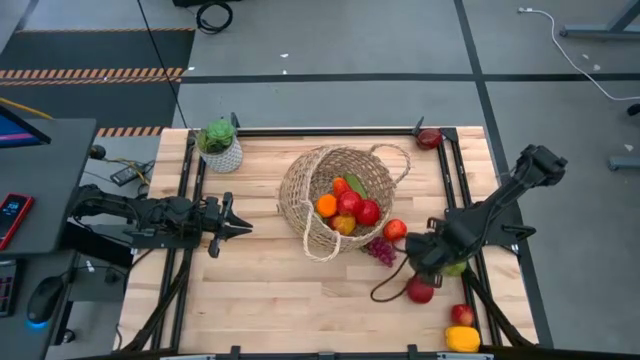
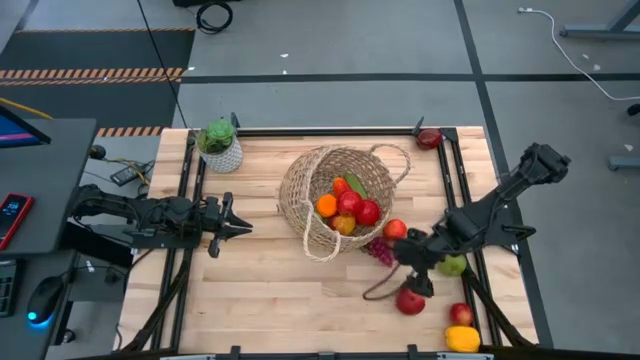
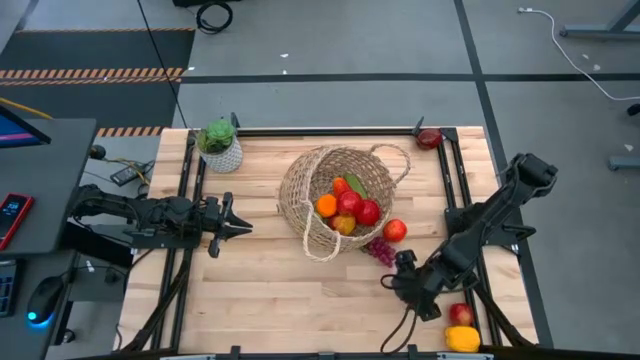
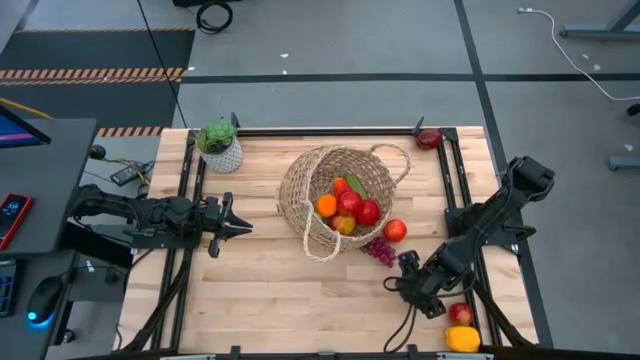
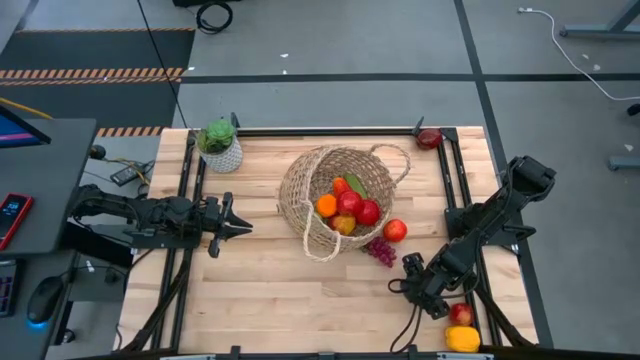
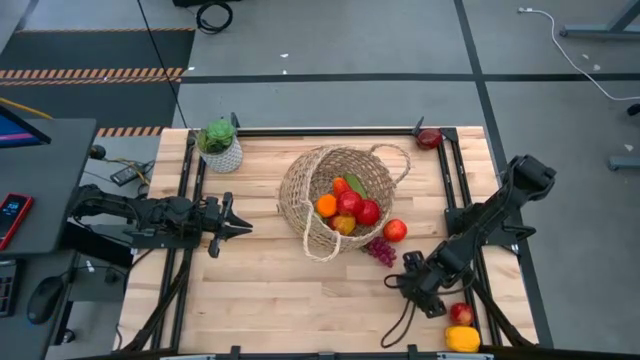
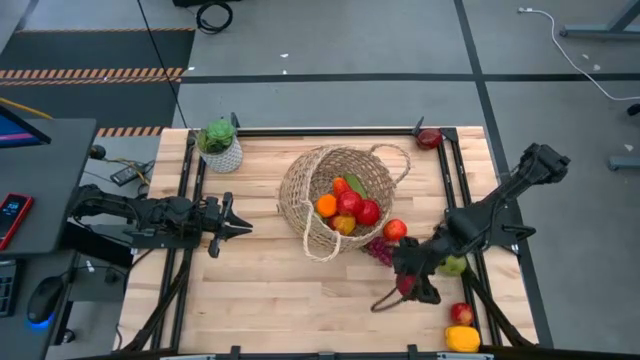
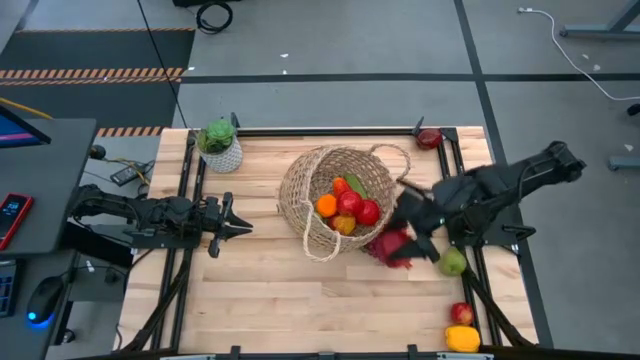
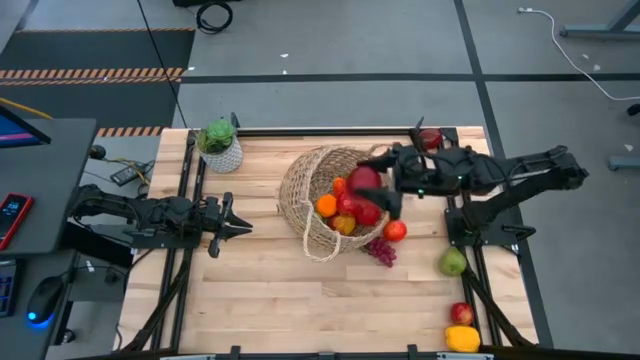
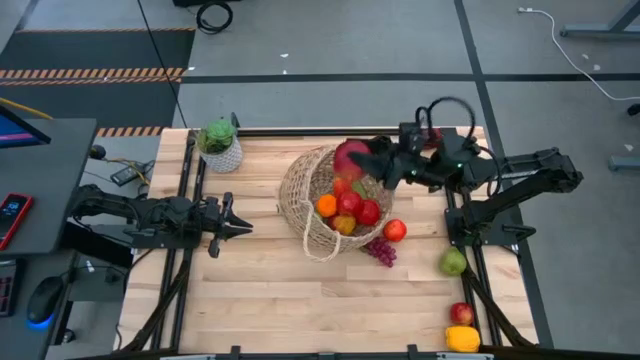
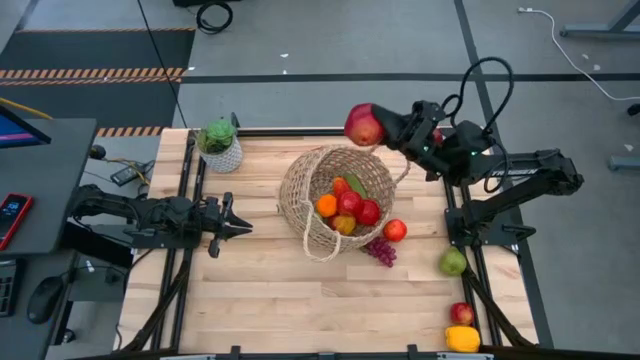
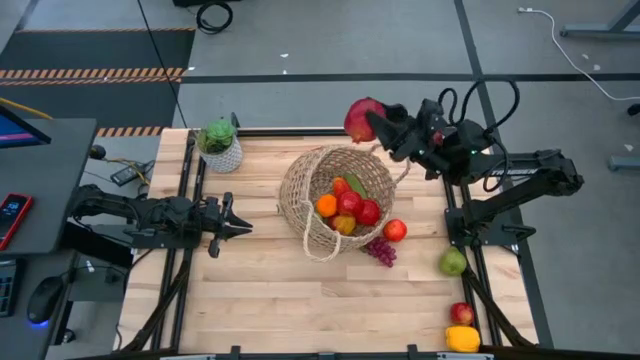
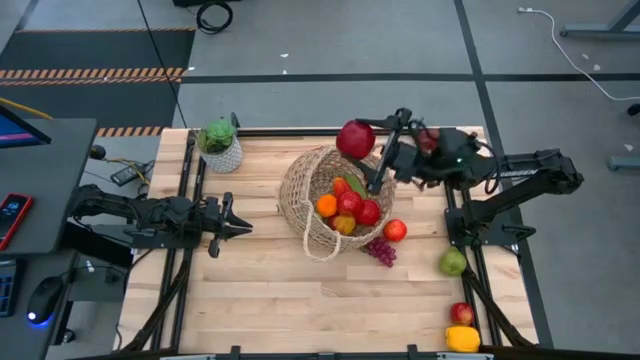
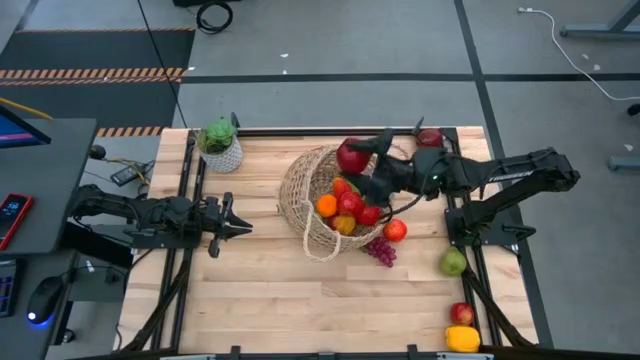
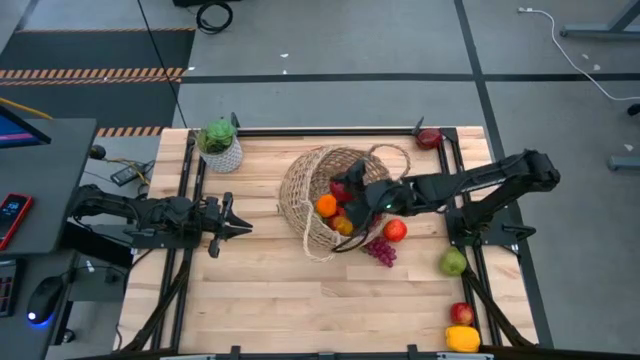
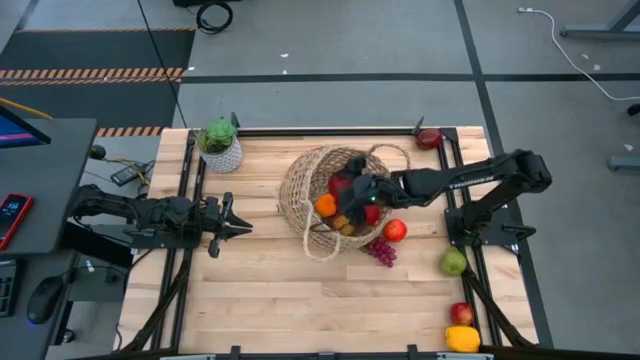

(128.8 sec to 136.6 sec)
Task: Build produce basket
Put the red pomegranate into the woven basket

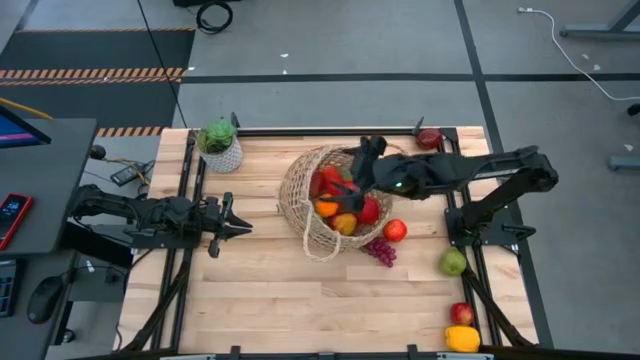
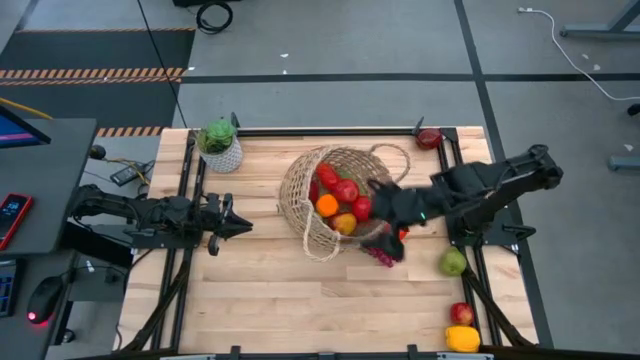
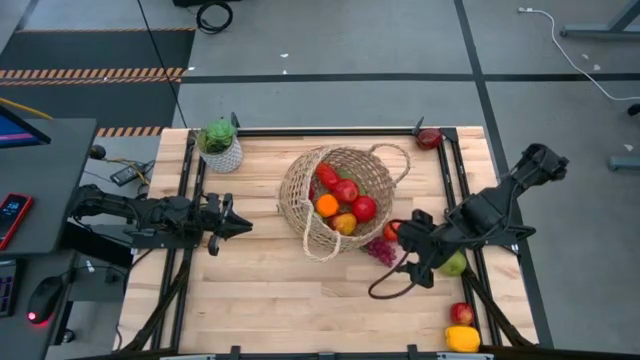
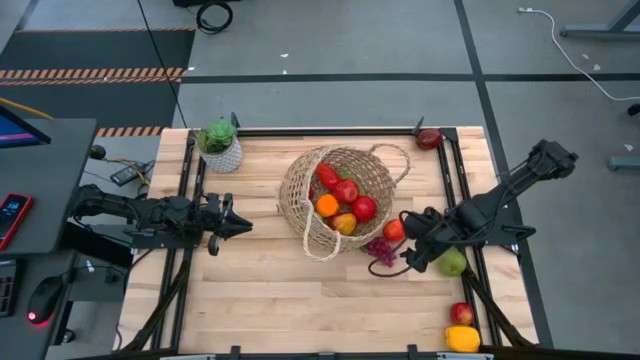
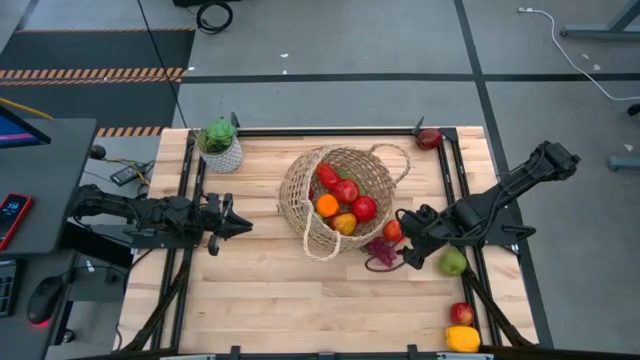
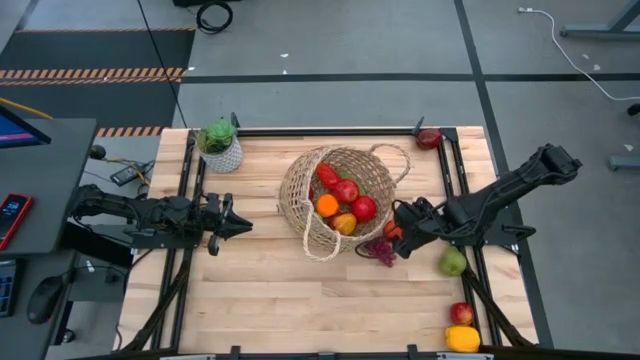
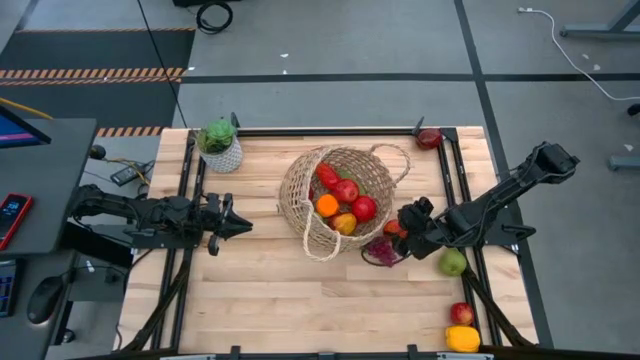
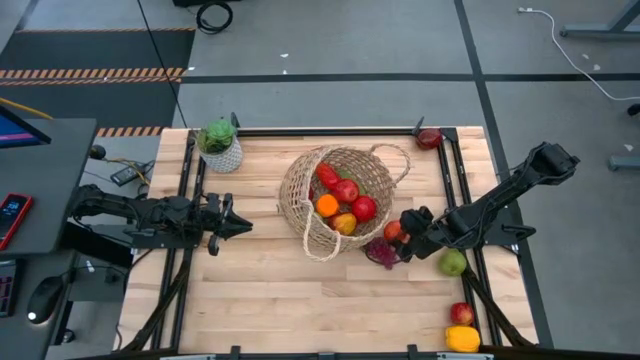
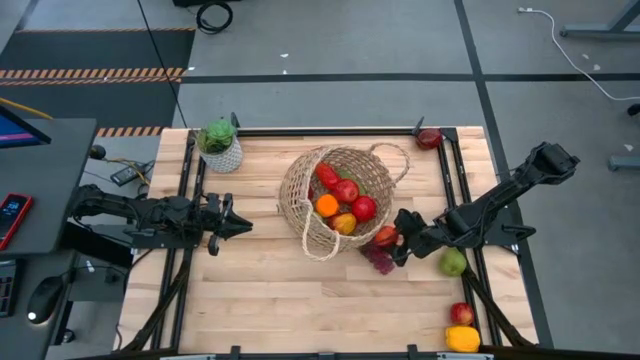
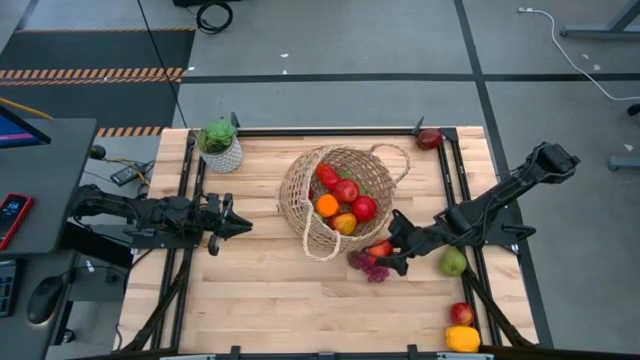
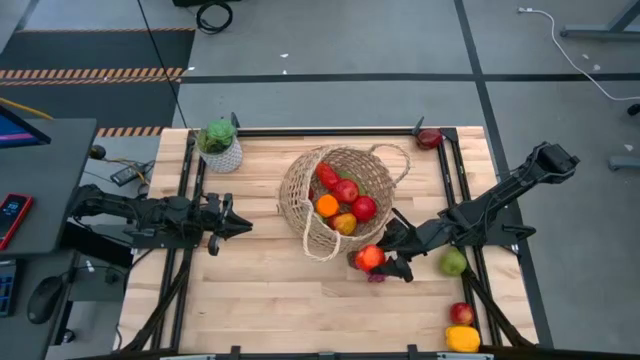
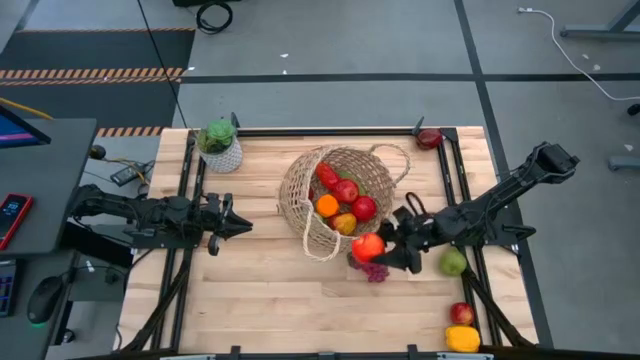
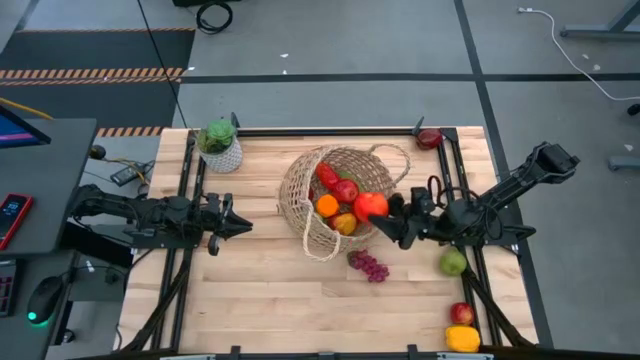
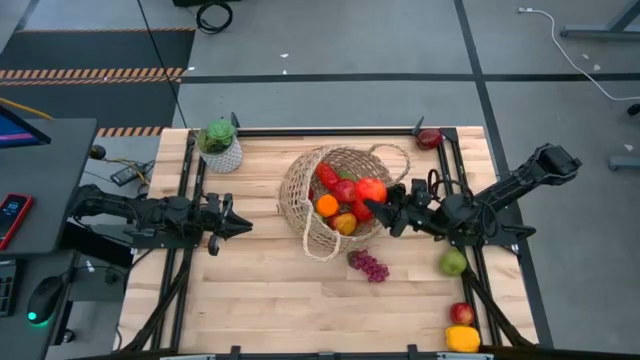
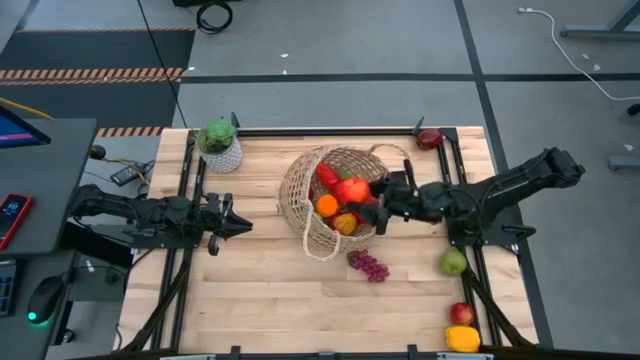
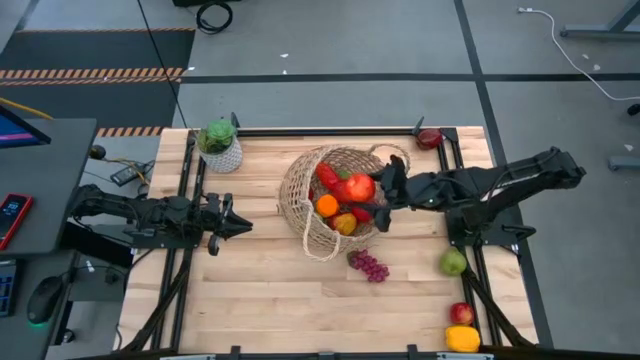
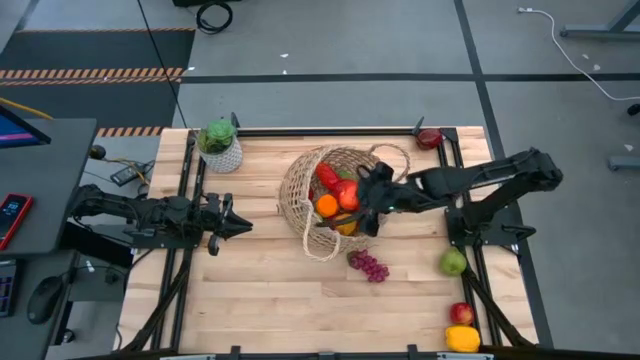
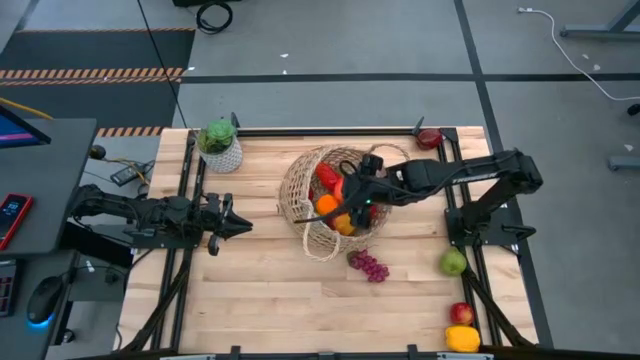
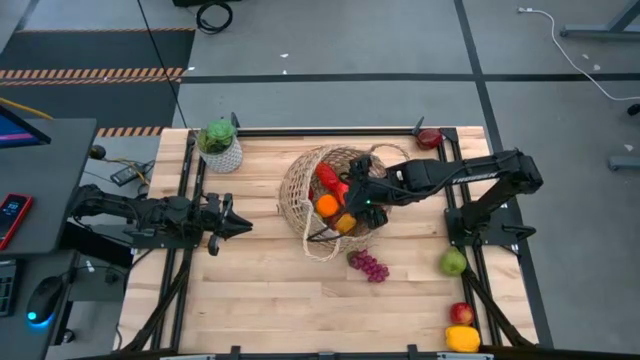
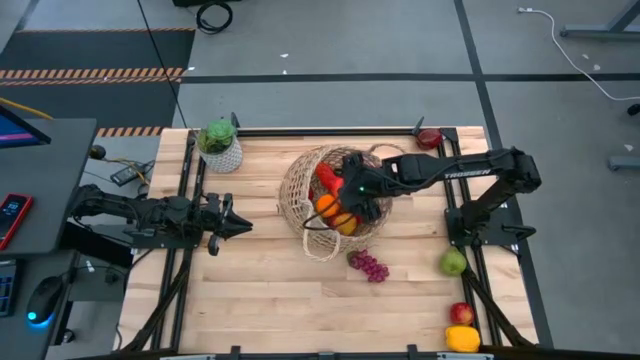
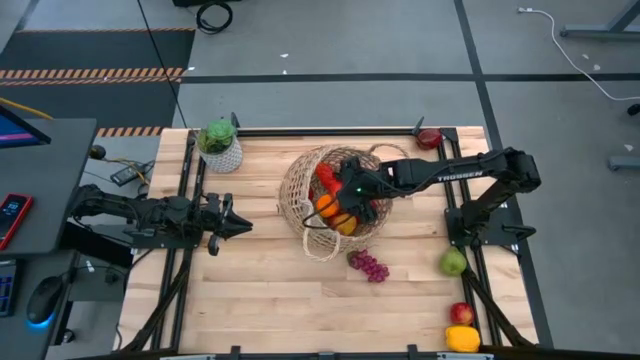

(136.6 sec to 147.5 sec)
Put the red apple into the woven basket

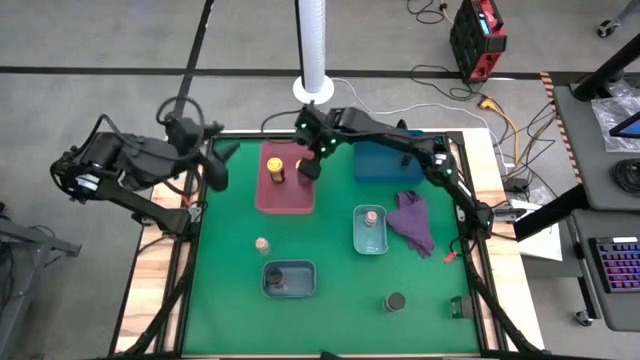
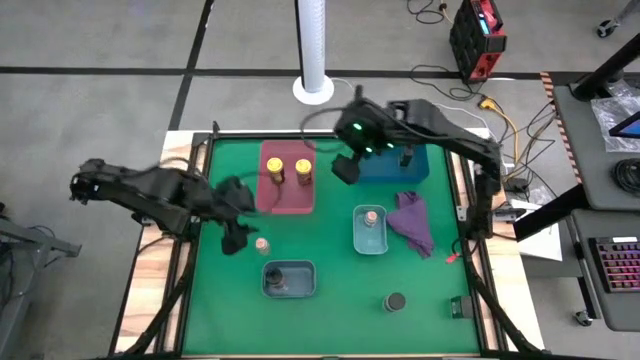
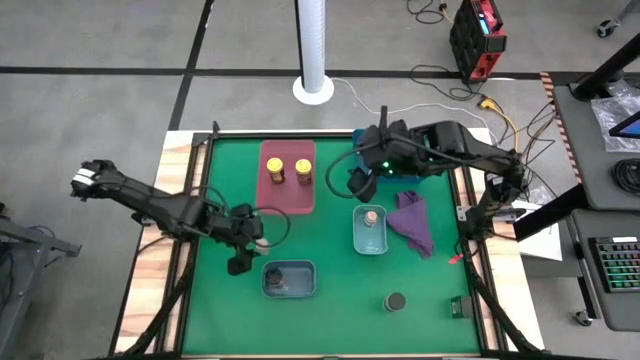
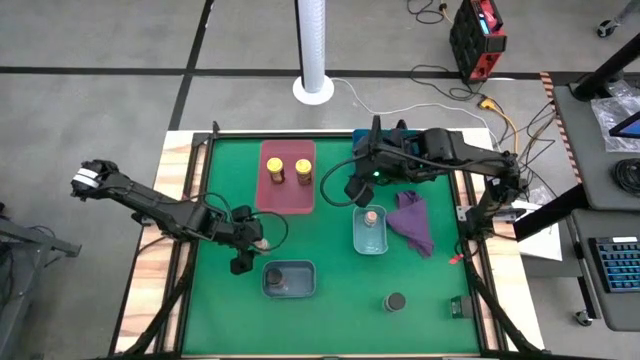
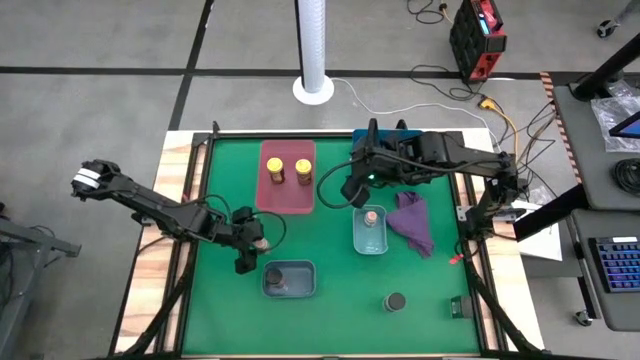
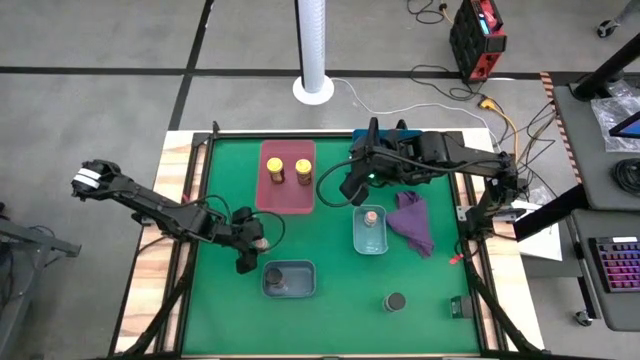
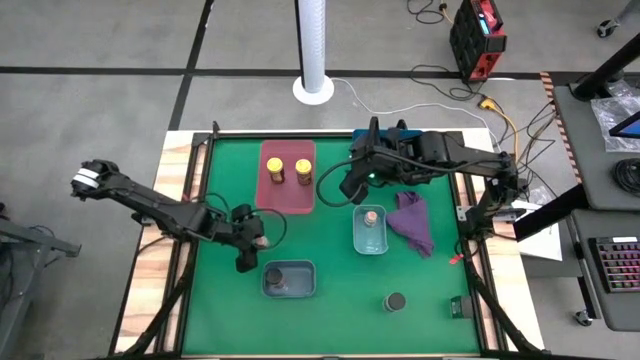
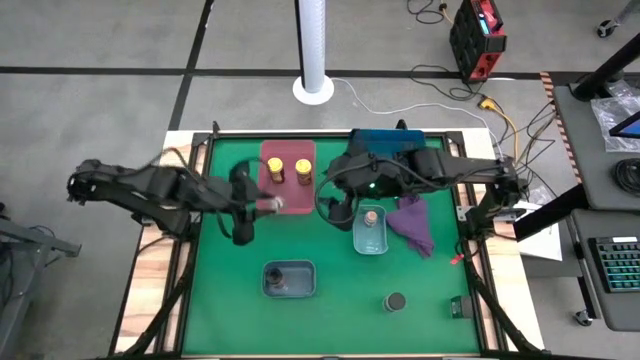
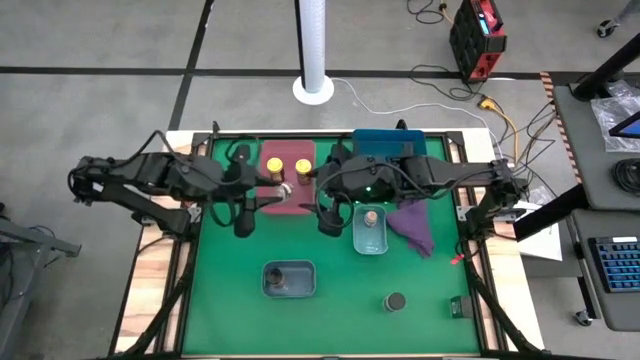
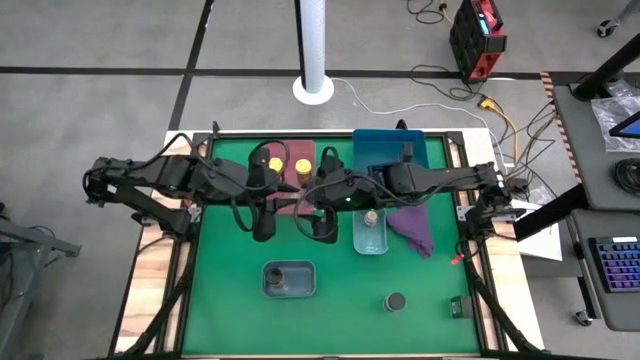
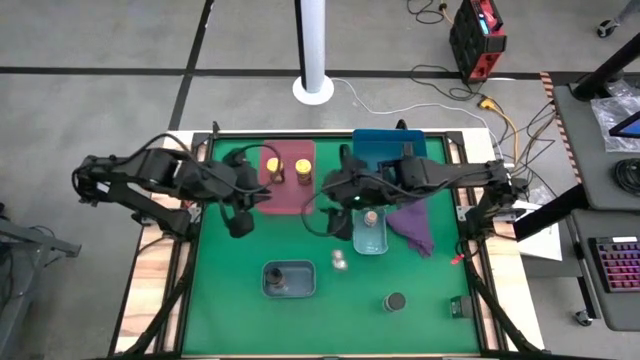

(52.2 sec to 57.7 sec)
Task: Sort spices by type
Put the brown seasoning bottle into the small light blue bin
